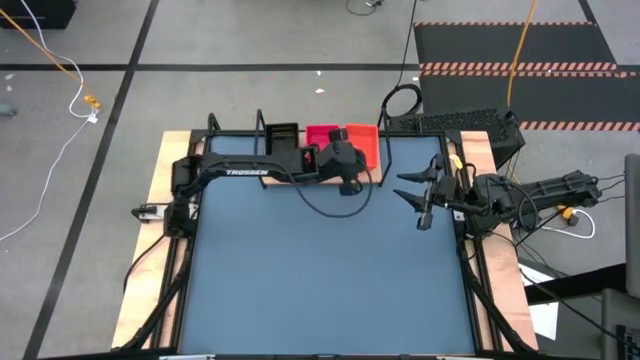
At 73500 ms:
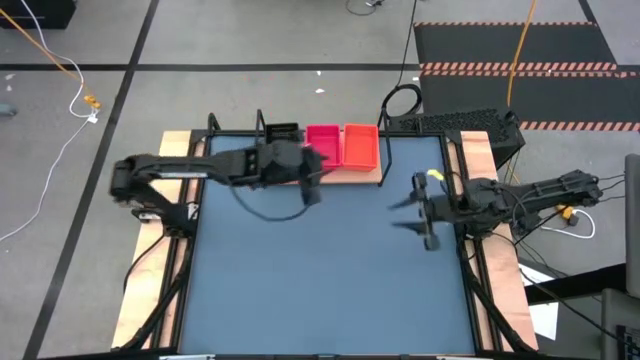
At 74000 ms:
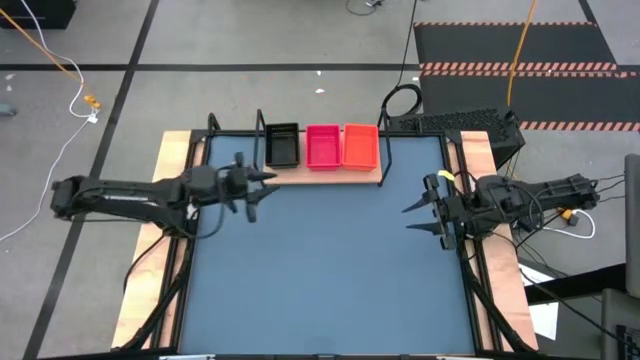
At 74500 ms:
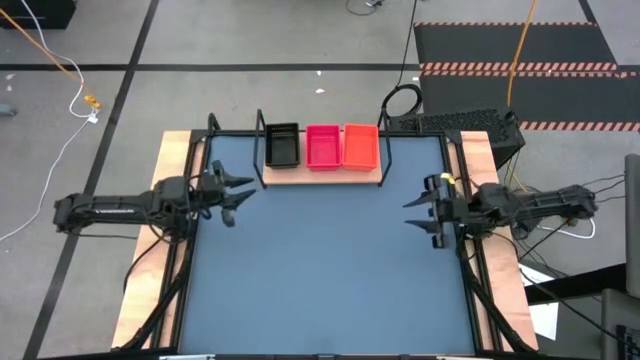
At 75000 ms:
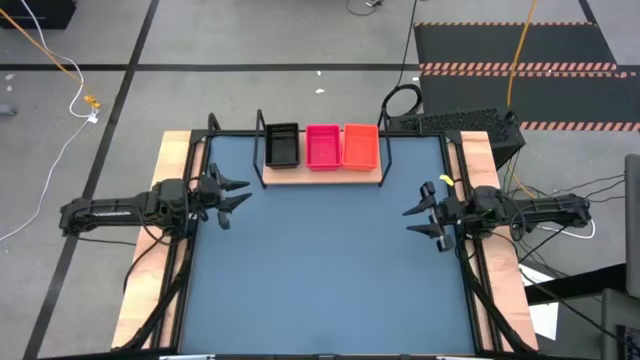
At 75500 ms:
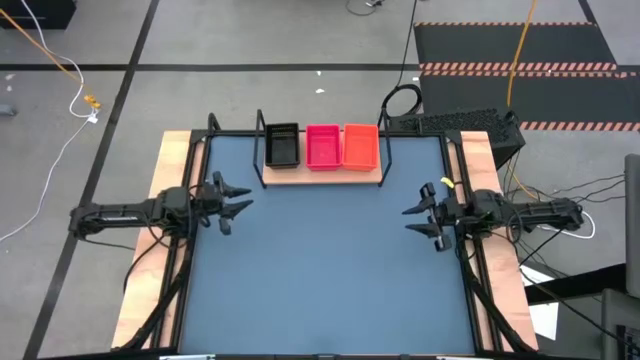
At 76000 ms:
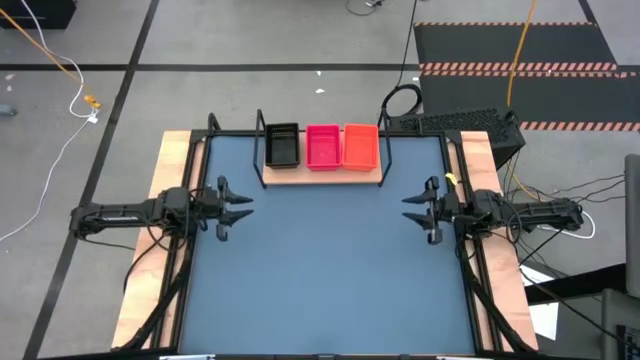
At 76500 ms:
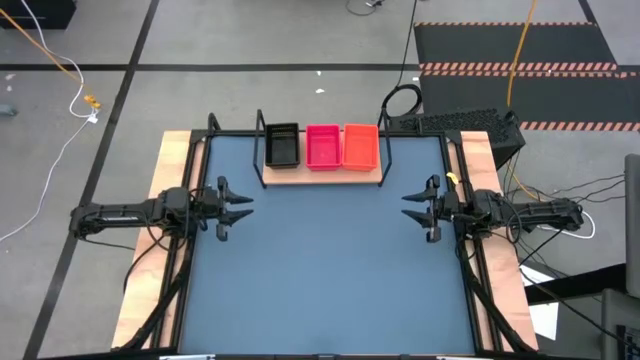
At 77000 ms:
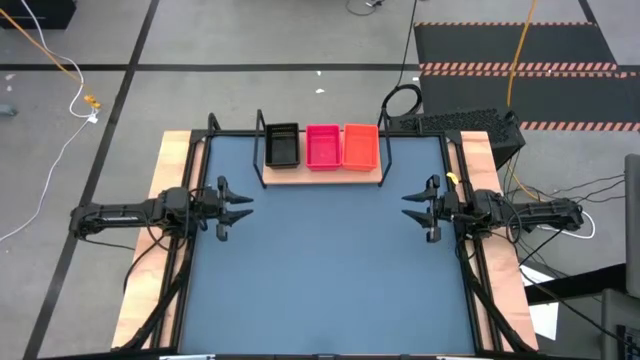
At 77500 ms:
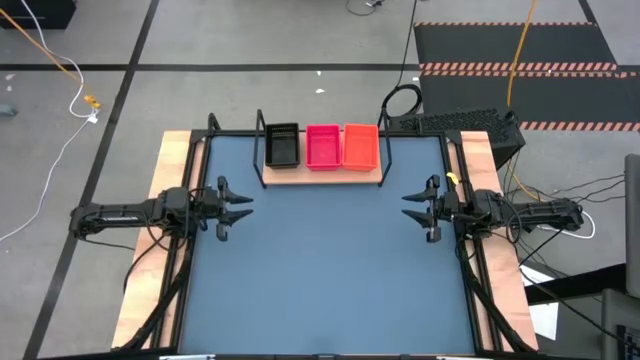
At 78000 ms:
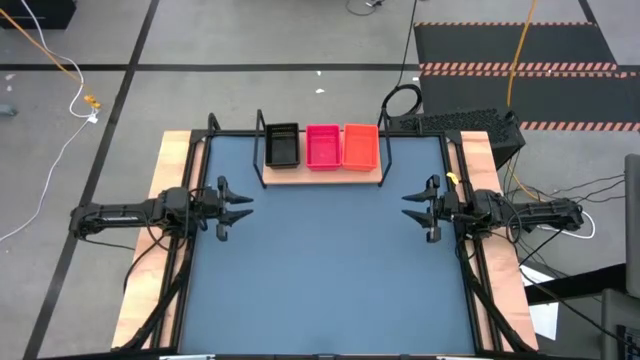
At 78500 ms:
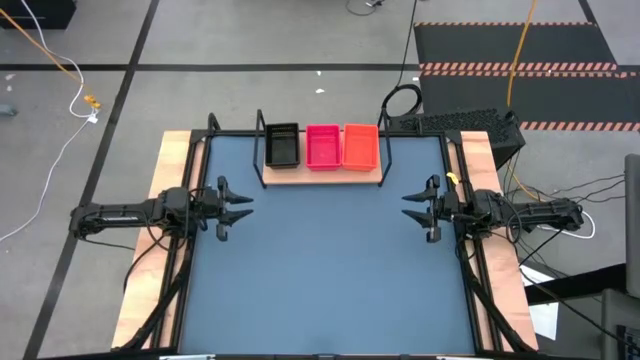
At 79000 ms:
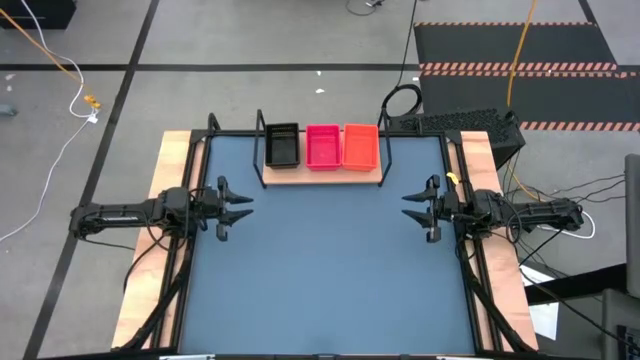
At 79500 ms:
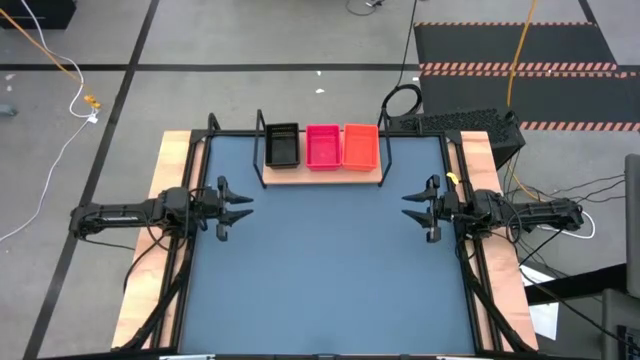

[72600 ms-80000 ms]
Task: Stack baskets on shelf by color
Return to Home Position

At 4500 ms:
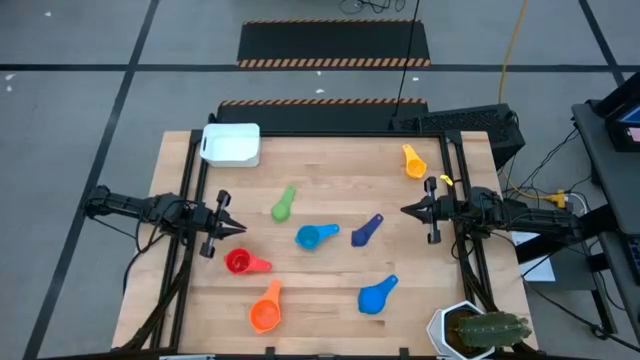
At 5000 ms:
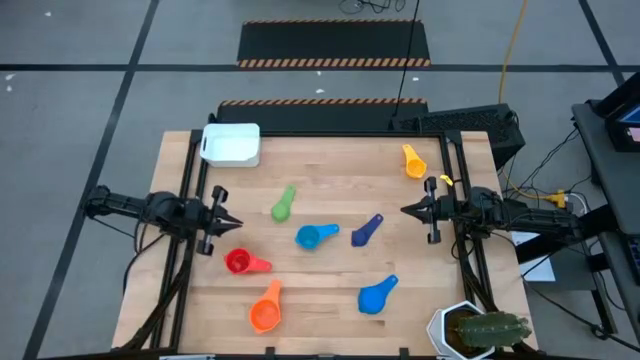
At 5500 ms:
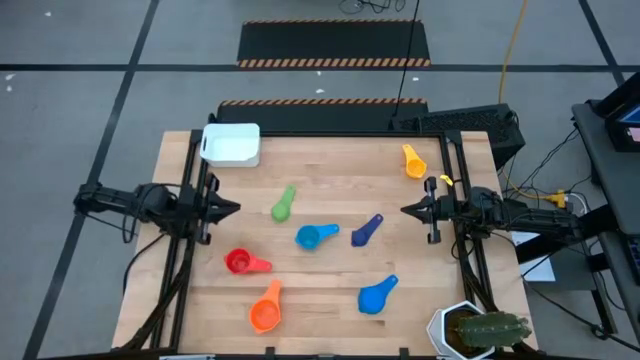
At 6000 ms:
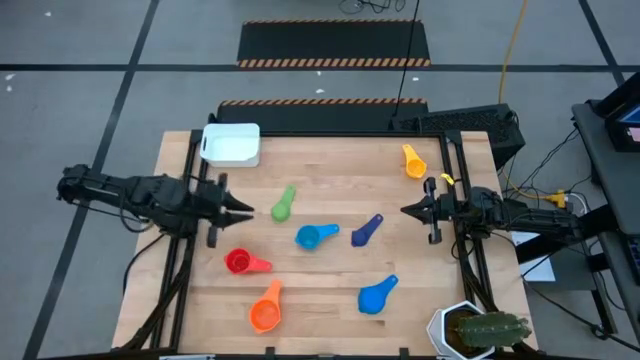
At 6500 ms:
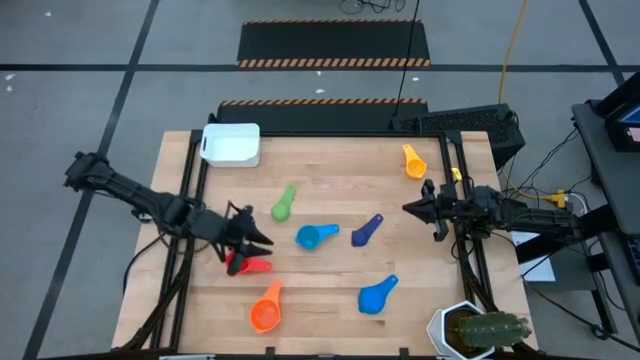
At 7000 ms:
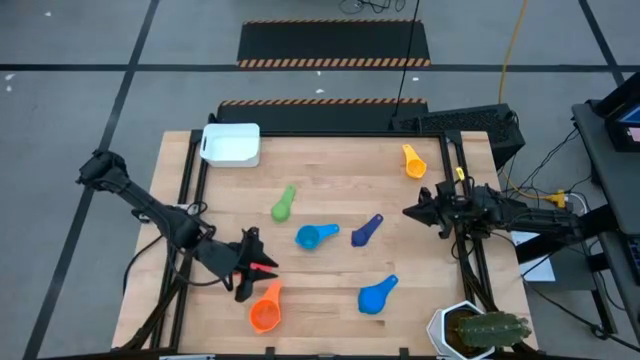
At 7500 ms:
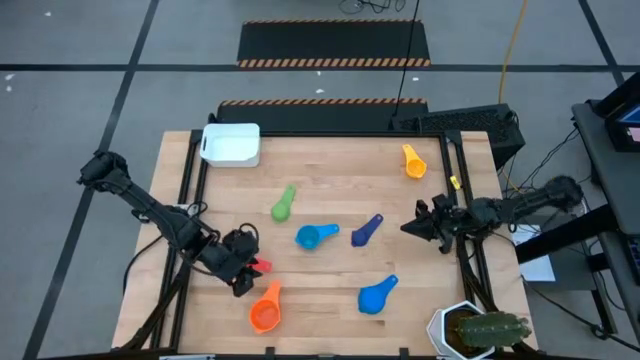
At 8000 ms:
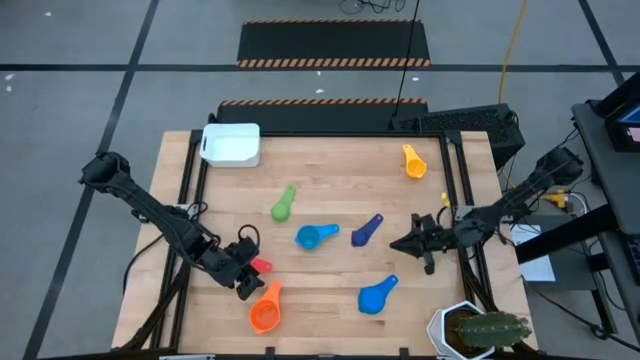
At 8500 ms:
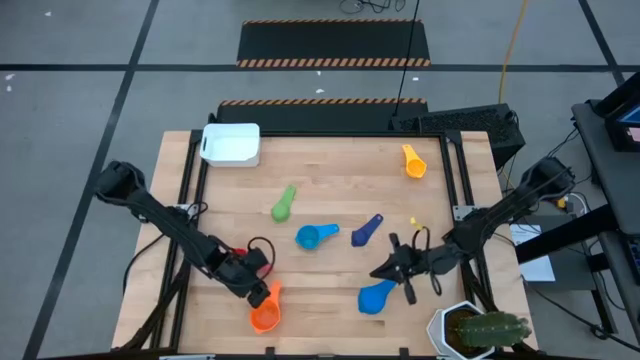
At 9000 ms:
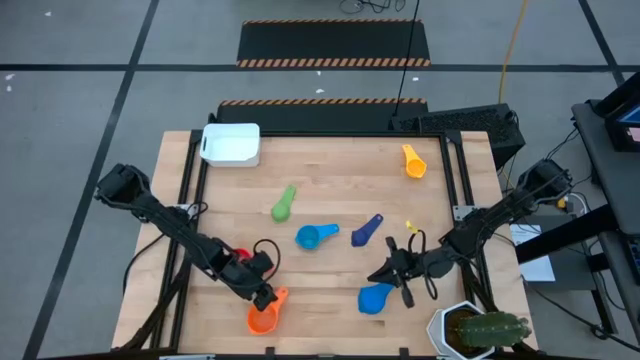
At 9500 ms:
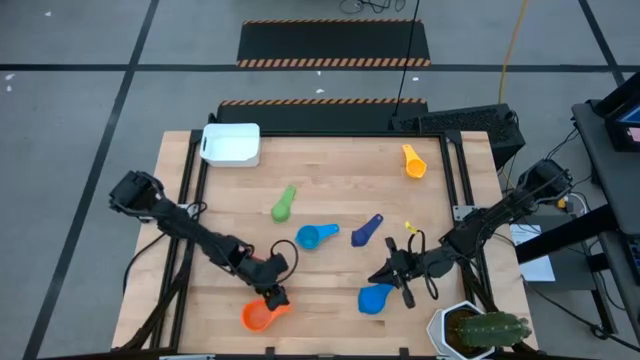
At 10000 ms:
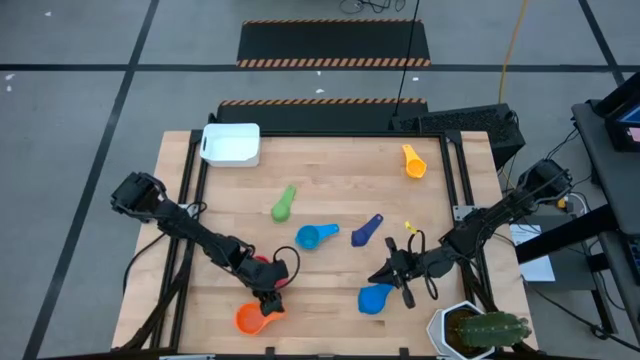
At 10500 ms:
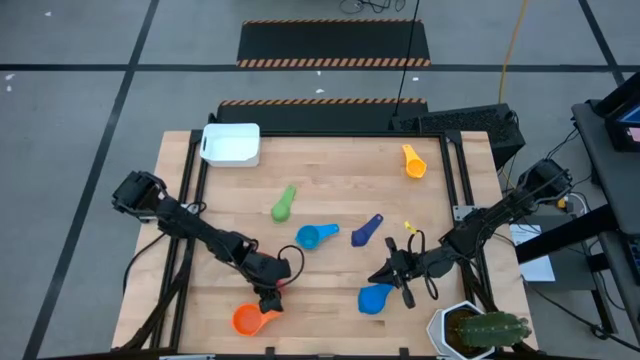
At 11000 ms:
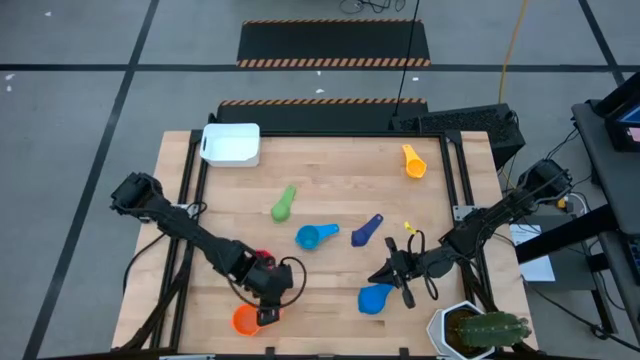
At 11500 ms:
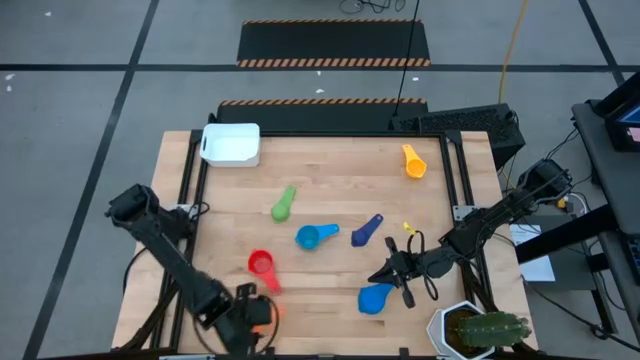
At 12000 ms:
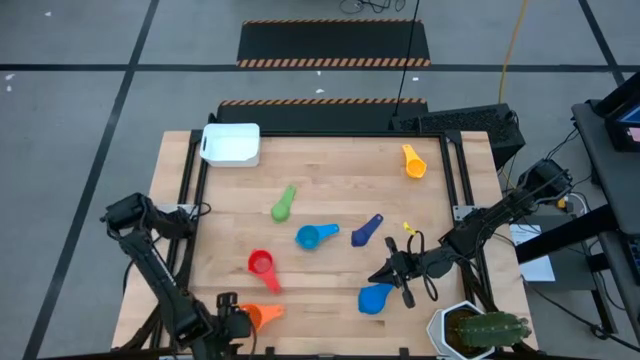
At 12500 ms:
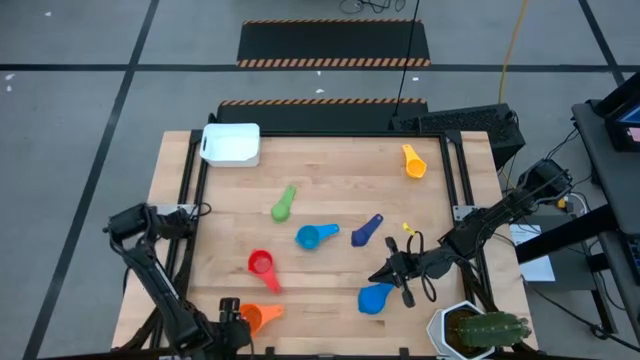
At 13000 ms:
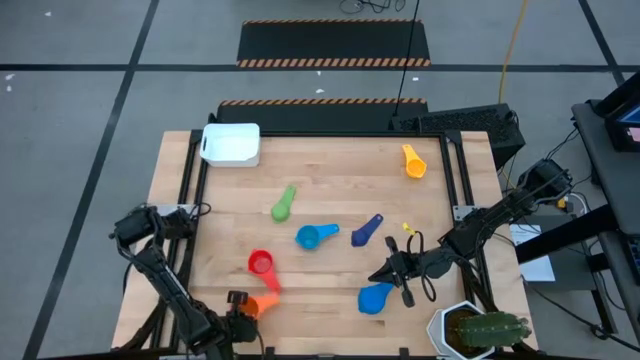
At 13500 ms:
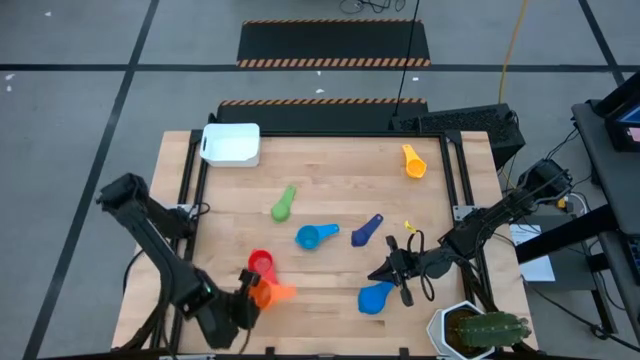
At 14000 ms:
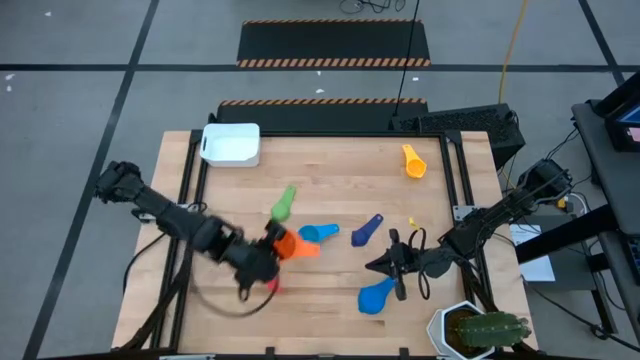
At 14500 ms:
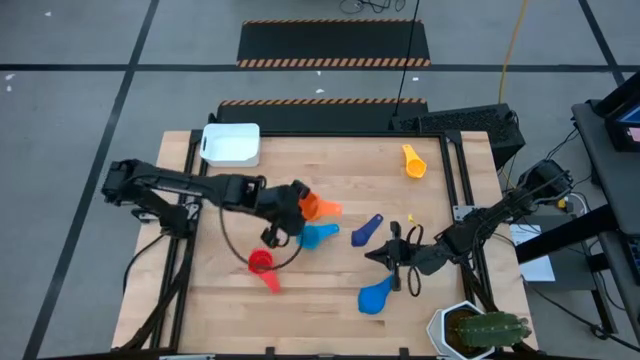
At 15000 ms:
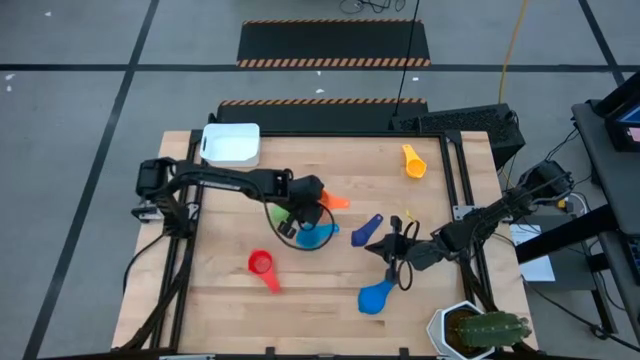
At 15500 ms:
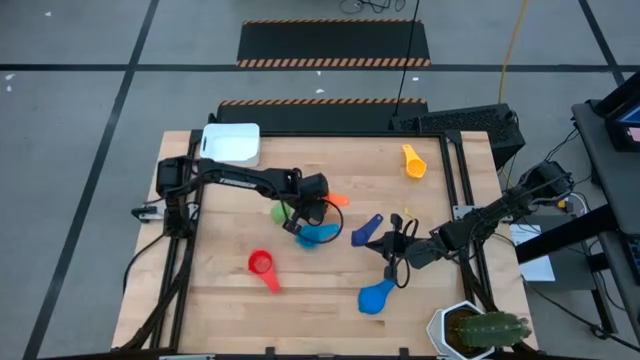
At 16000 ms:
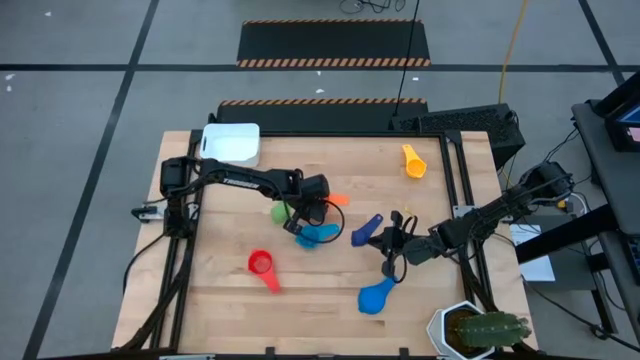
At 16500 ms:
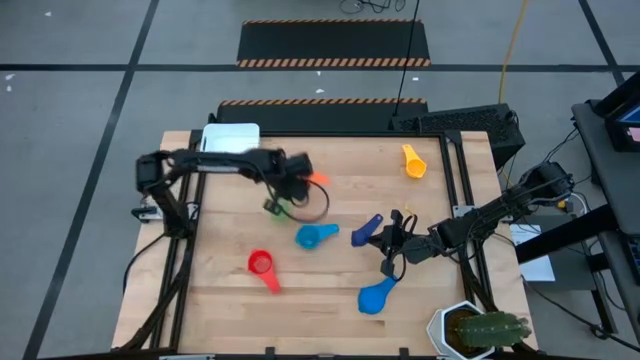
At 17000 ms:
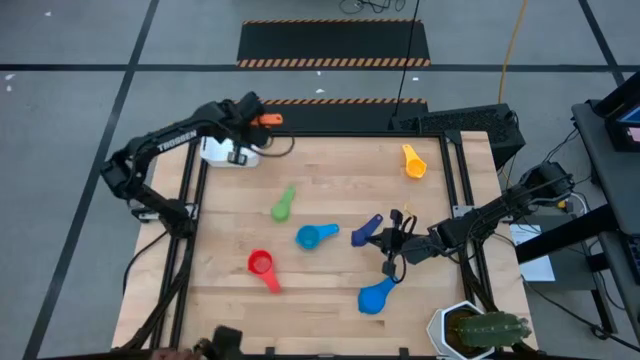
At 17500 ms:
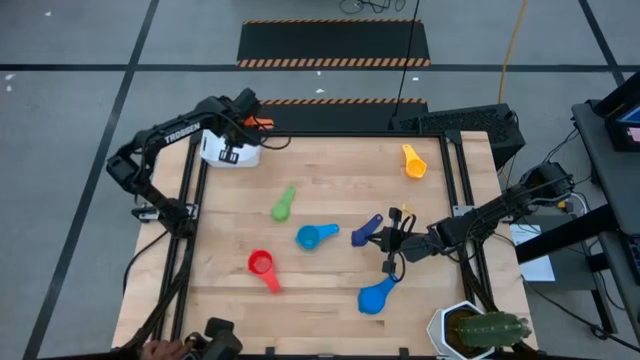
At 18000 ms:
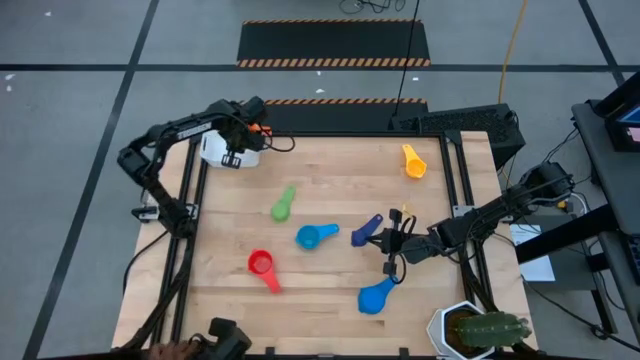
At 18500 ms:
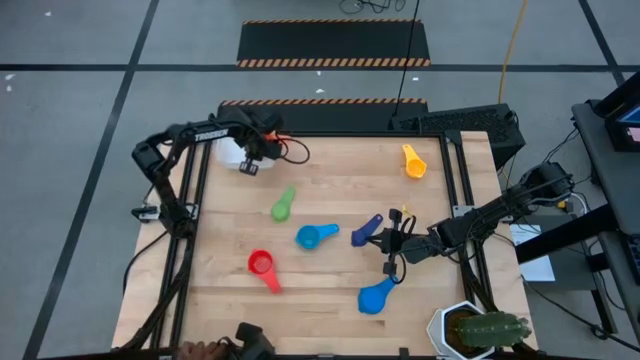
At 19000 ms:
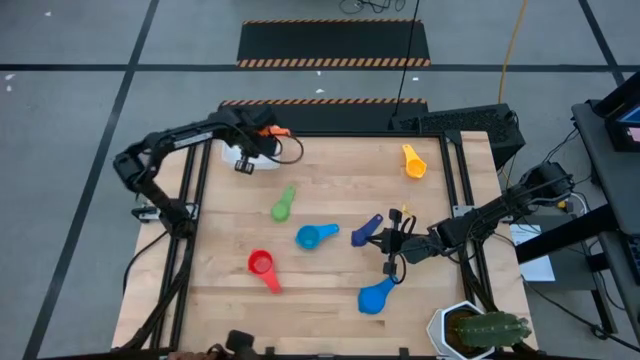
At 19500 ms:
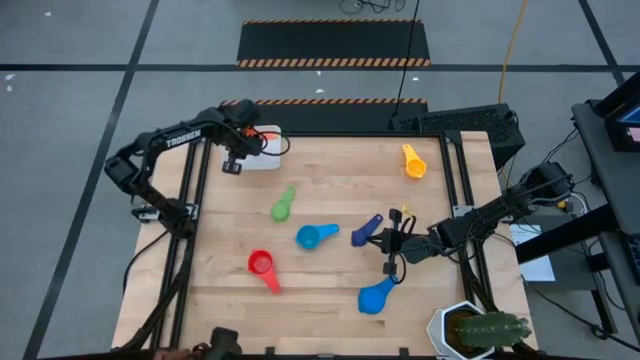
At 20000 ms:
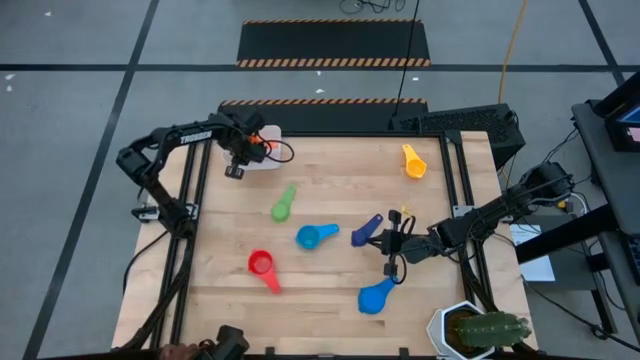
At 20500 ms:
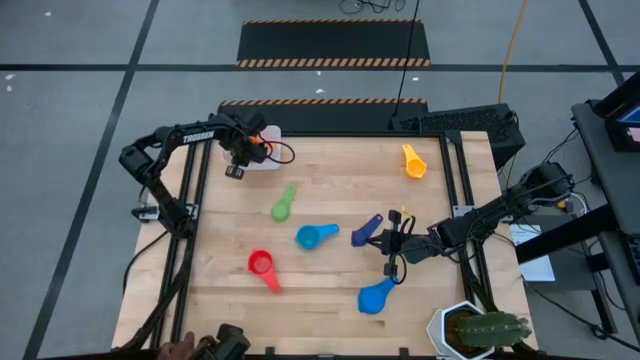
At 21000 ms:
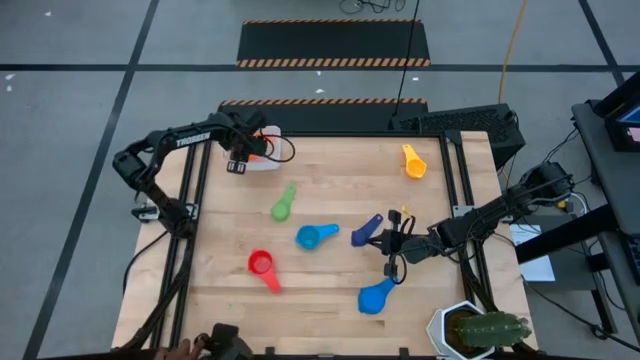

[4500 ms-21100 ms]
Task: Nest measuring cups in basket
Put the orange measuring cup into the white bin
